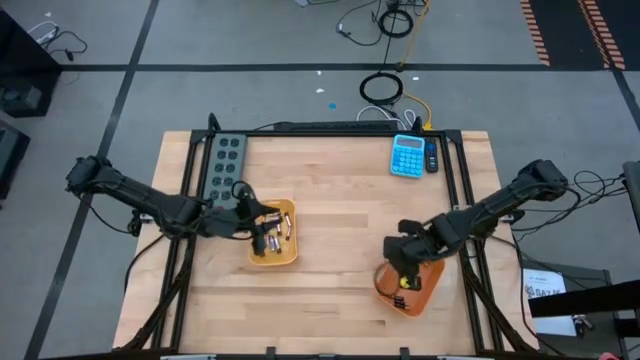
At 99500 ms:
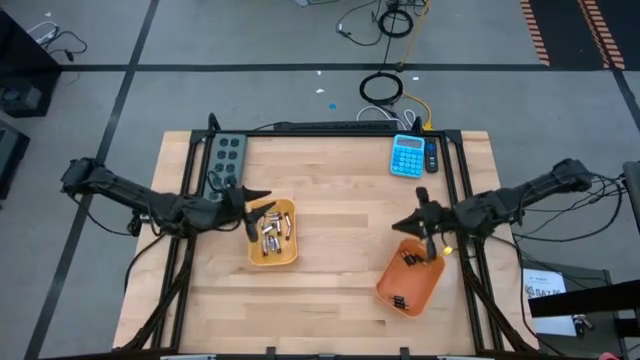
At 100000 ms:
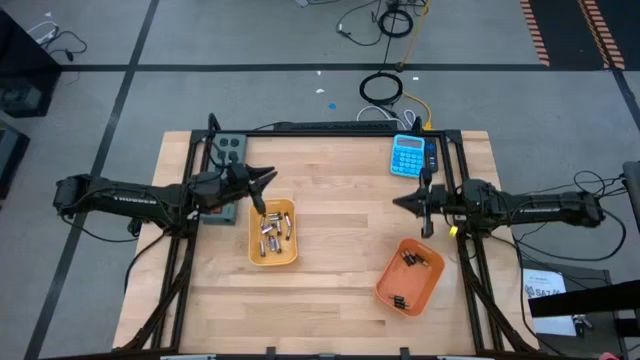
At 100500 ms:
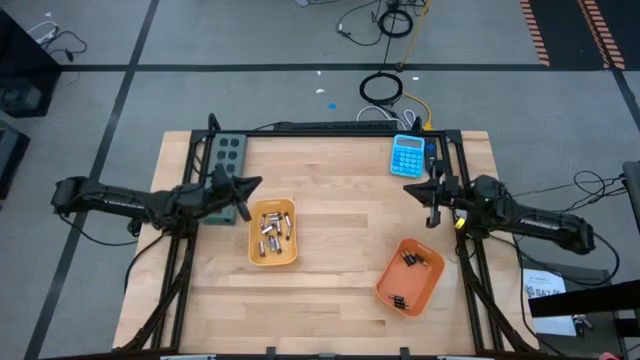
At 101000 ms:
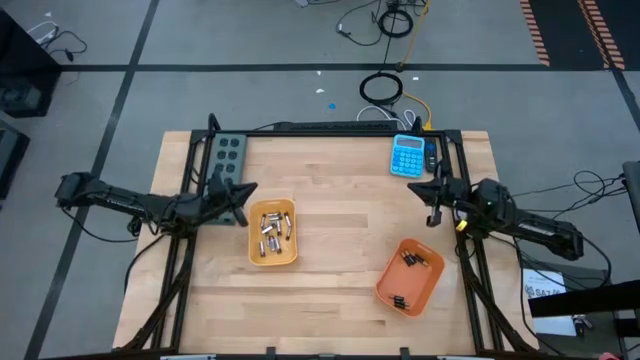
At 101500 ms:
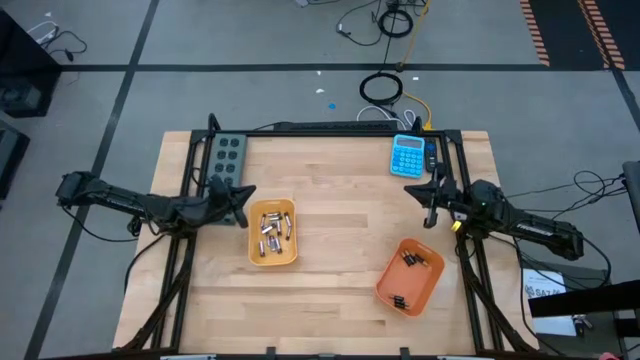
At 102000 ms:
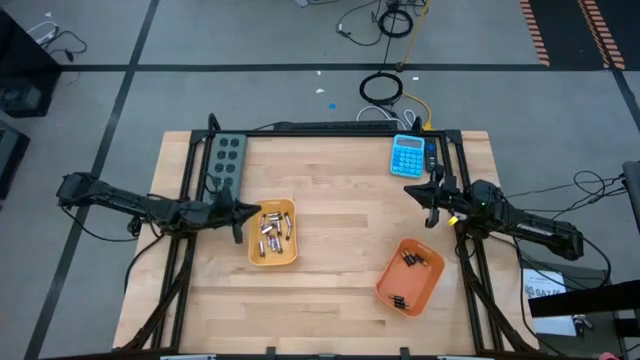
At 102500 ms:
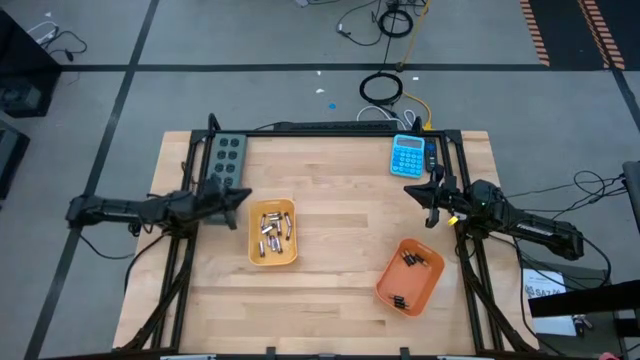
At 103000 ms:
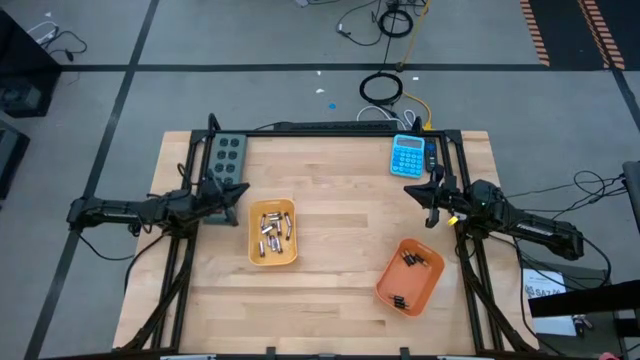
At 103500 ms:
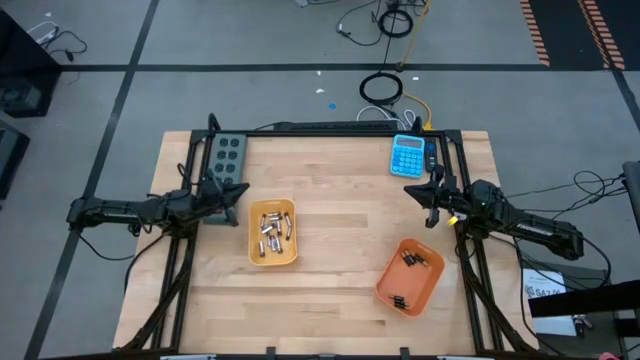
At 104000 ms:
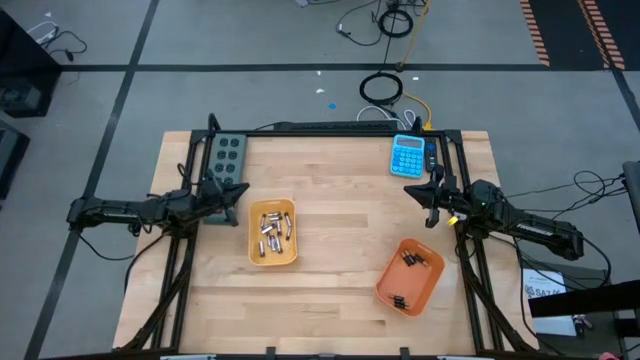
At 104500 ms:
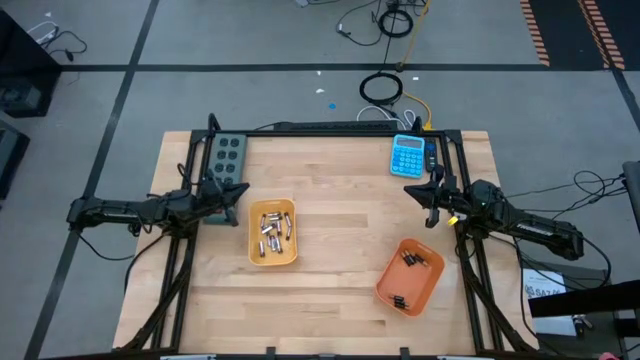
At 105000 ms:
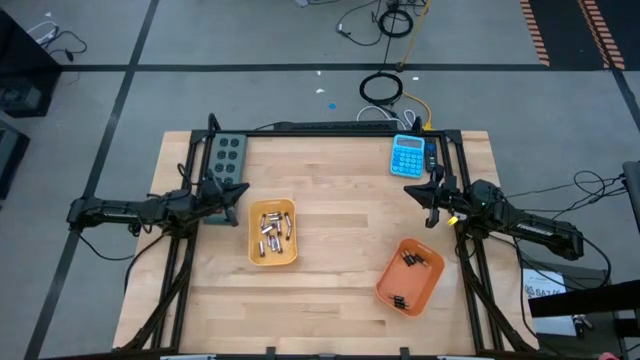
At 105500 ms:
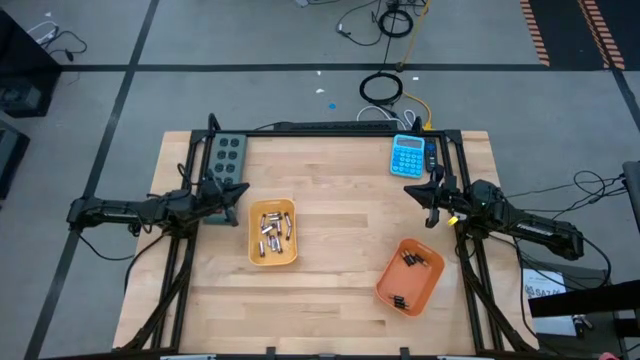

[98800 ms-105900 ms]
Task: Sort batteries
Return to Home Position

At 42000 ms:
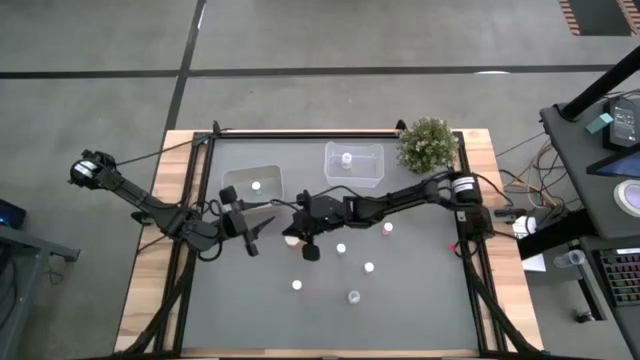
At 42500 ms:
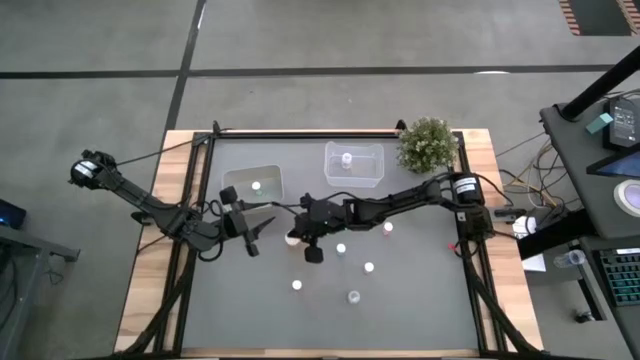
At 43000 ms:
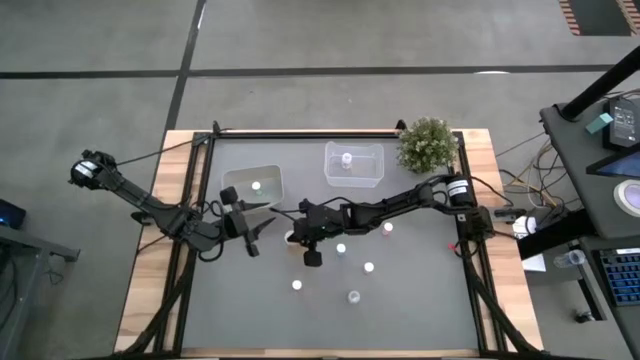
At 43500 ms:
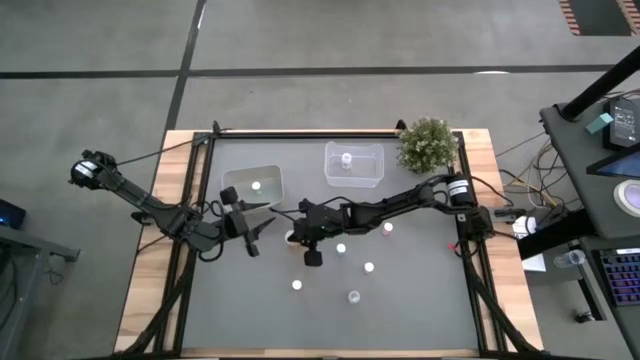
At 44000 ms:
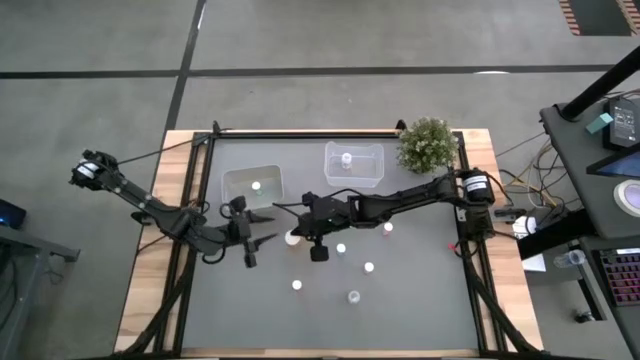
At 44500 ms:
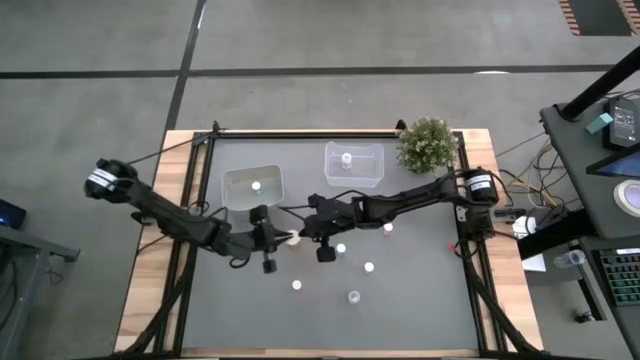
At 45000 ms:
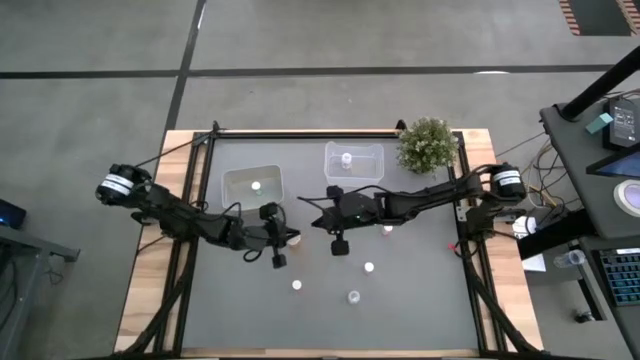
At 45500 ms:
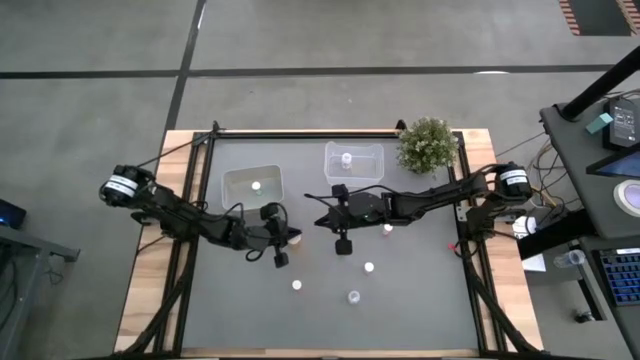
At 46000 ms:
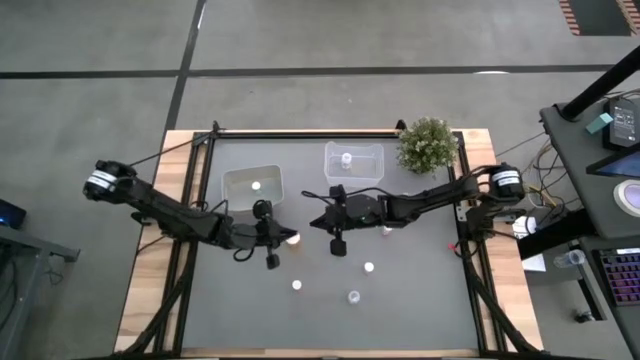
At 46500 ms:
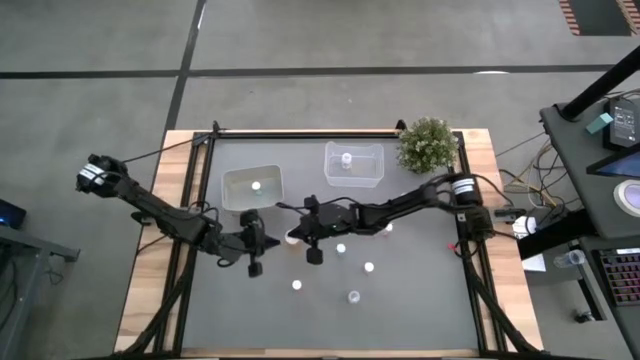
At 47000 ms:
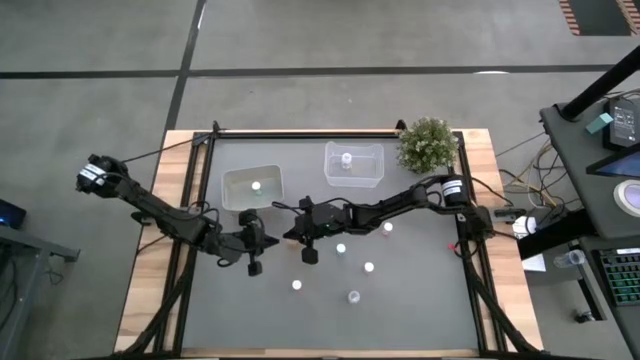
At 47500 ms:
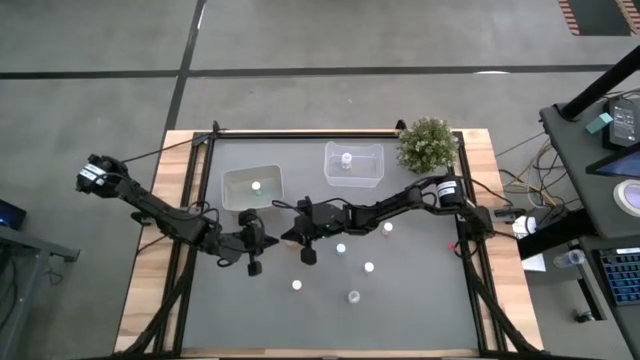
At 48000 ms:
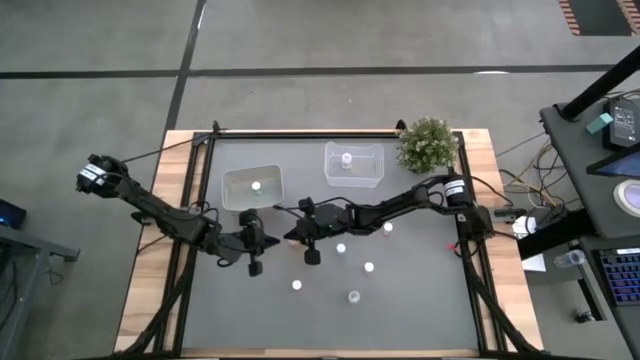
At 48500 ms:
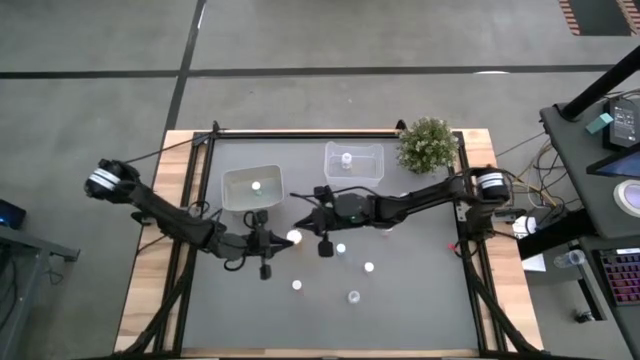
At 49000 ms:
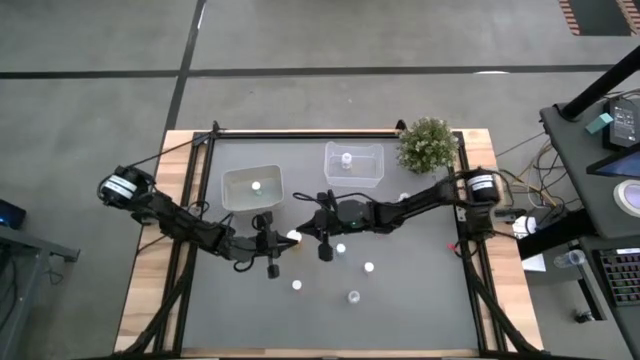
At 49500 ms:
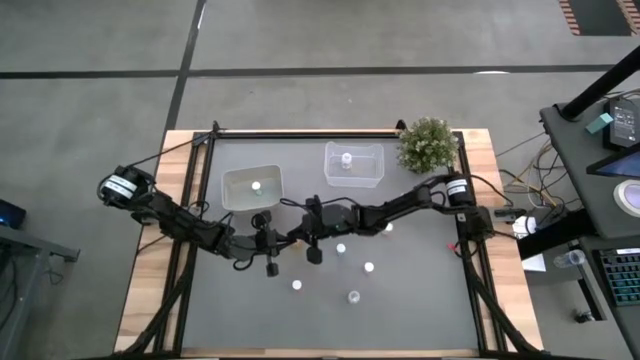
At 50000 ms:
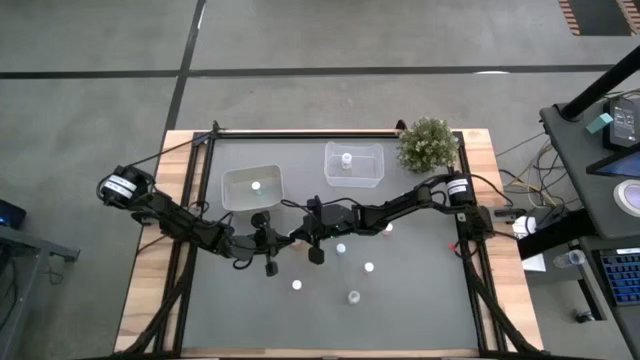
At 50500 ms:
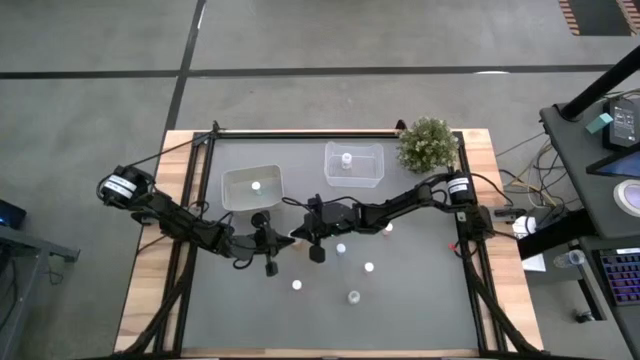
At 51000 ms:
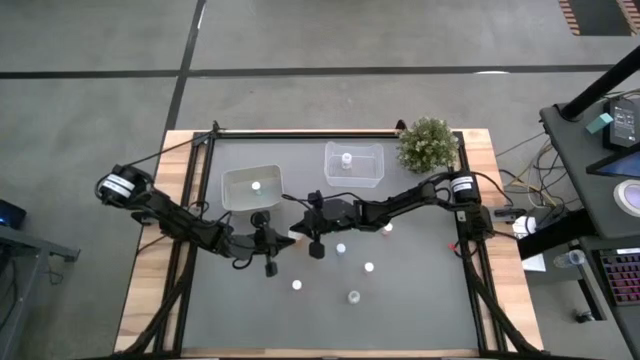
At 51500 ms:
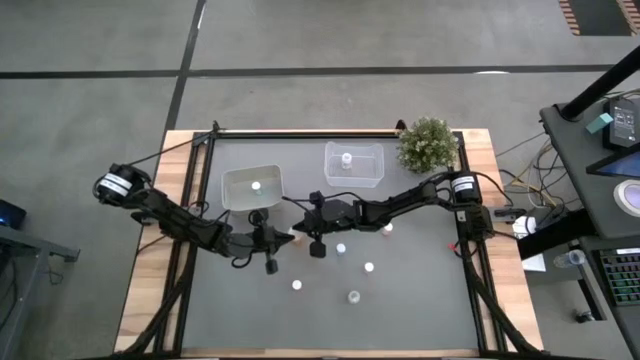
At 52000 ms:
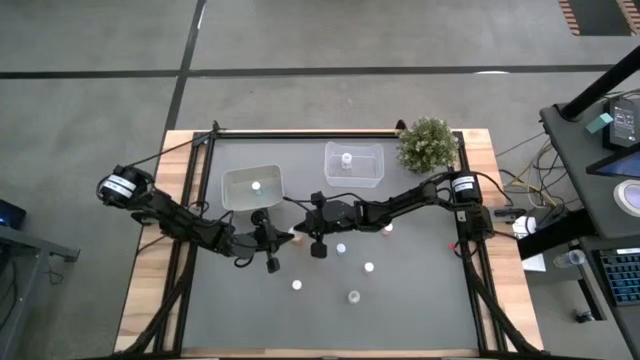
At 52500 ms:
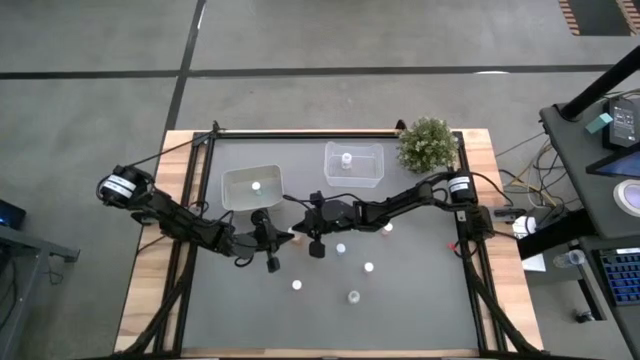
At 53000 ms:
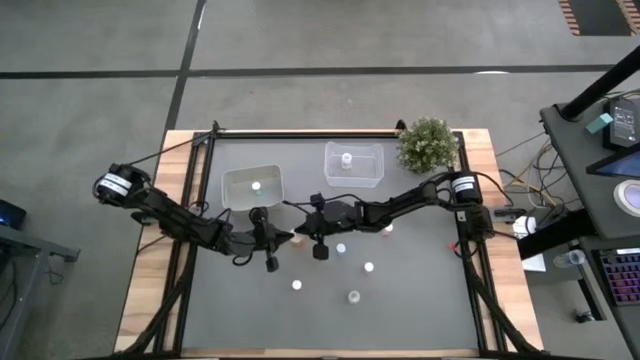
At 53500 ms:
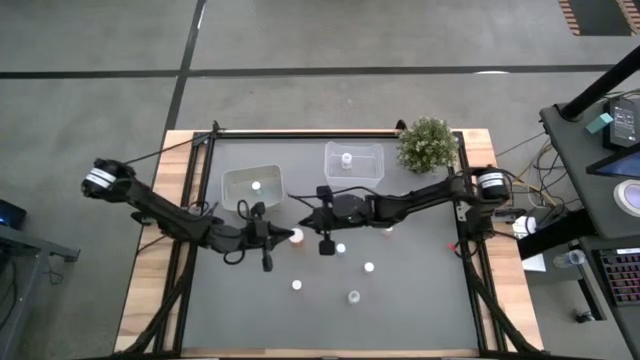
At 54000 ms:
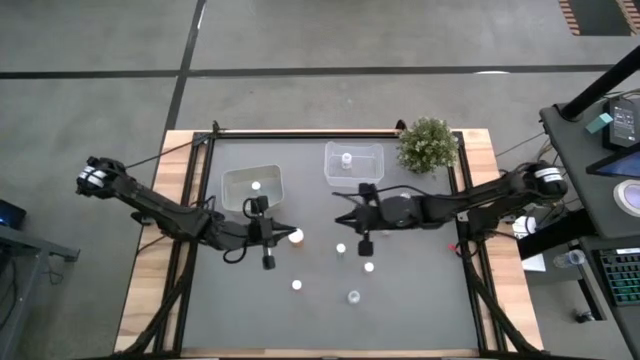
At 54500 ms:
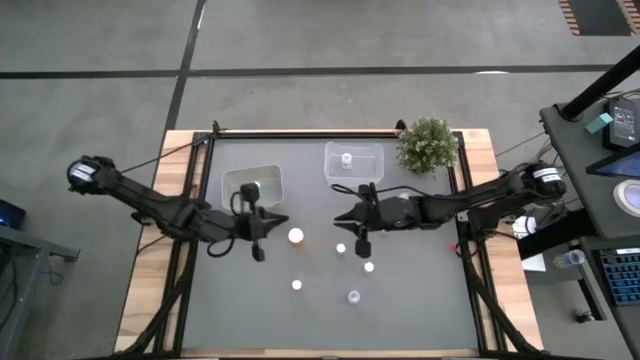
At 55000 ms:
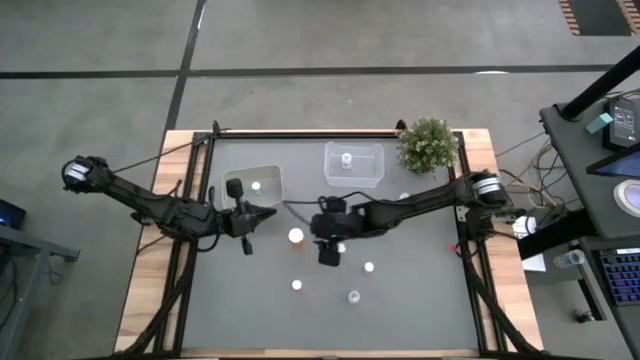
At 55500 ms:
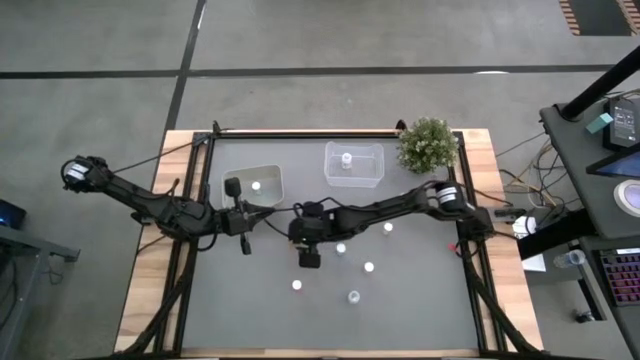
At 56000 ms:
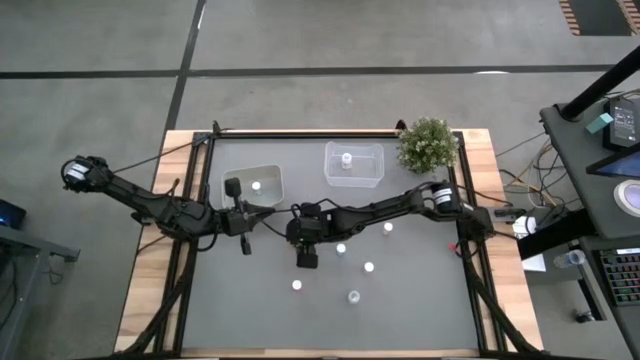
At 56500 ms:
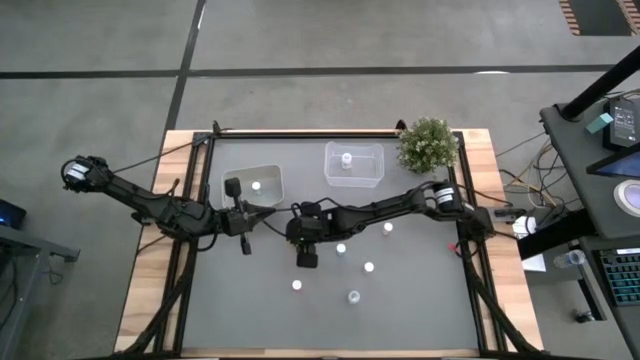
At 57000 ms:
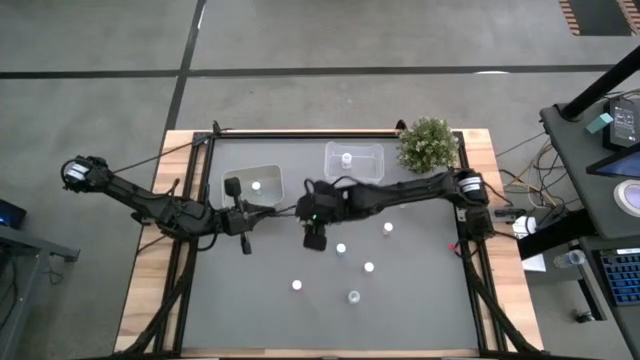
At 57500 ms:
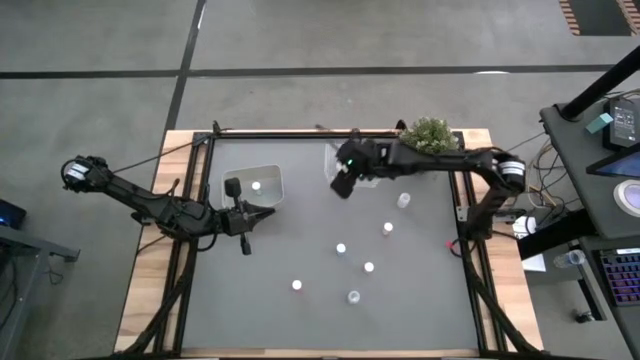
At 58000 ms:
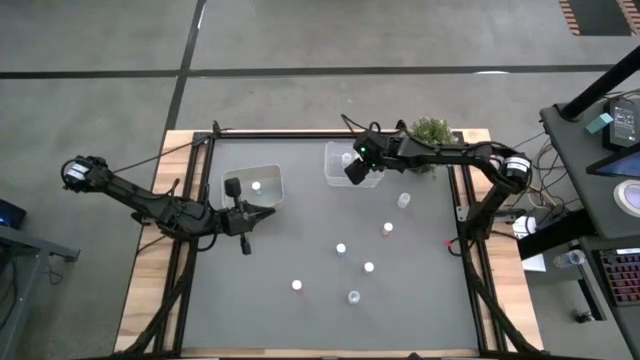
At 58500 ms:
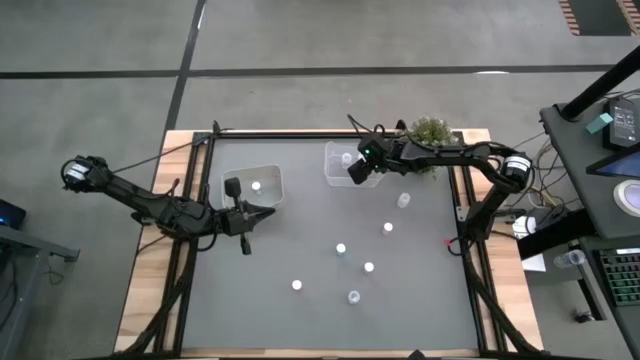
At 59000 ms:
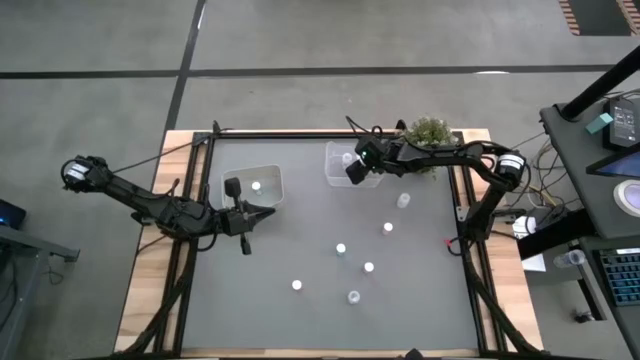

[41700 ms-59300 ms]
Task: Pick and place medicine bottles into bin by pill shape (circle, oval)
Put the big orange pill bottle into the transparent bin
